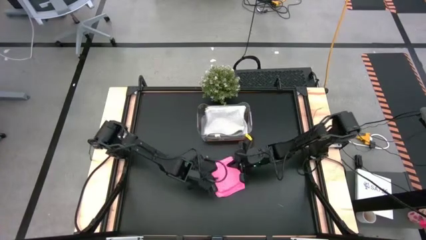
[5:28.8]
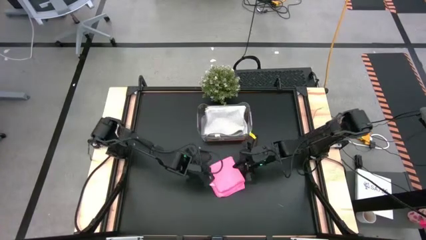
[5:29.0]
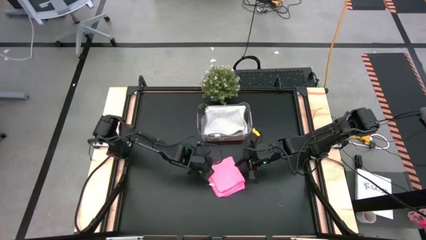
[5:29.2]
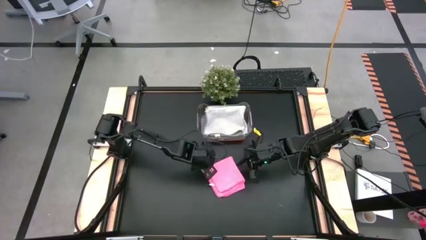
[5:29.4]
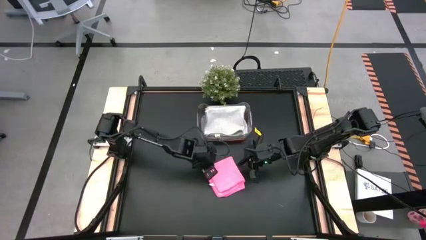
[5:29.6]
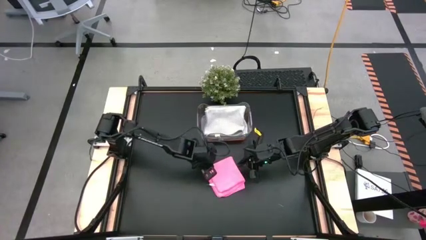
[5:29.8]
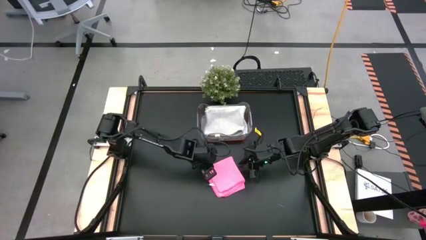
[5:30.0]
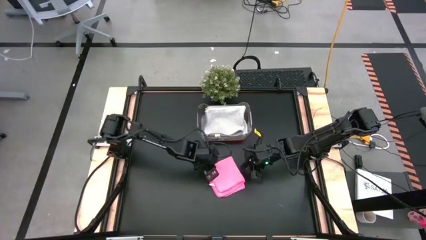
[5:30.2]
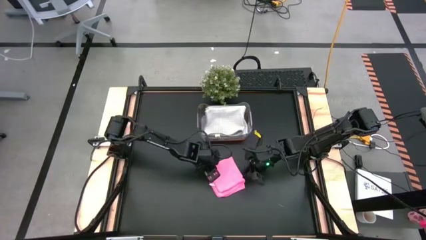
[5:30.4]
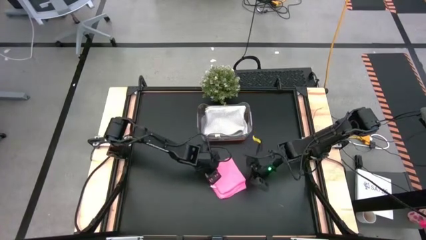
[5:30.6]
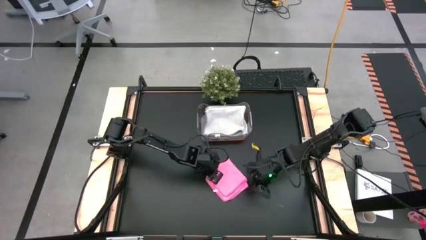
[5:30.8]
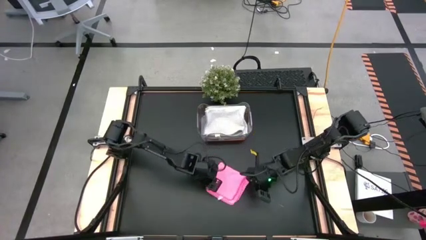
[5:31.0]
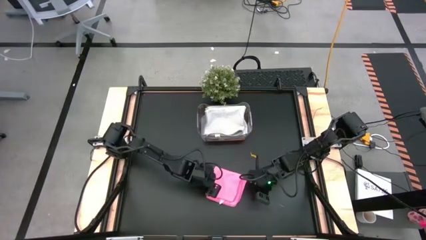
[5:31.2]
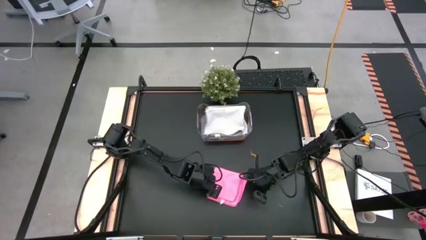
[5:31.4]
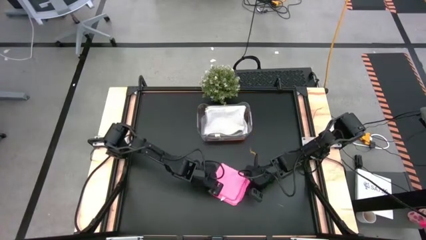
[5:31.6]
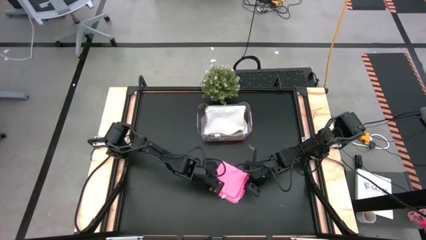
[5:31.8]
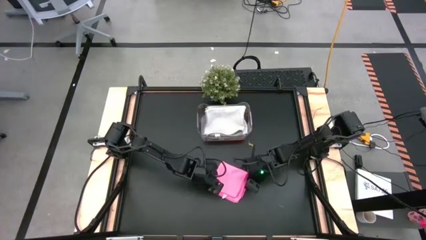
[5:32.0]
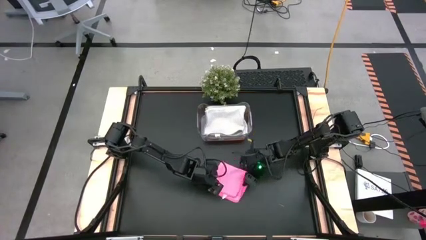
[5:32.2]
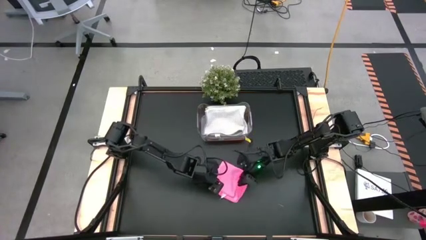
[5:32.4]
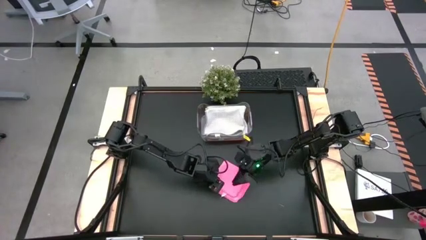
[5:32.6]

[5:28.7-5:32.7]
Task: Fold microfiber towels
Put the pink microfiber towel into the transparent bin

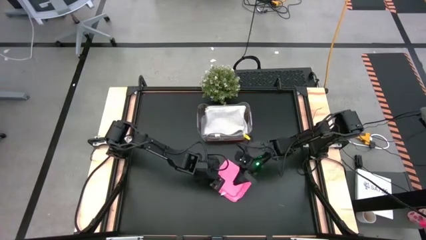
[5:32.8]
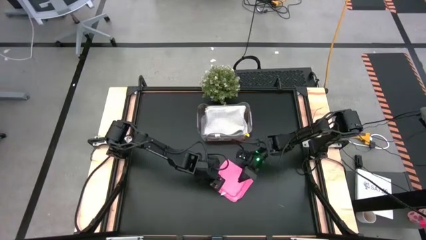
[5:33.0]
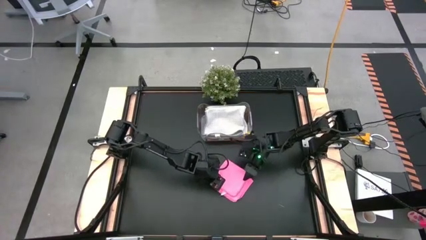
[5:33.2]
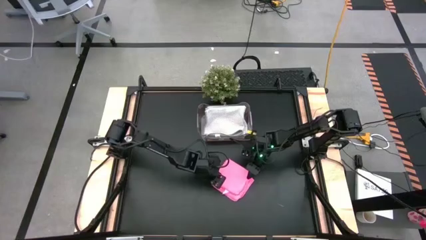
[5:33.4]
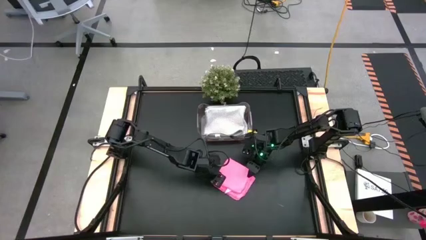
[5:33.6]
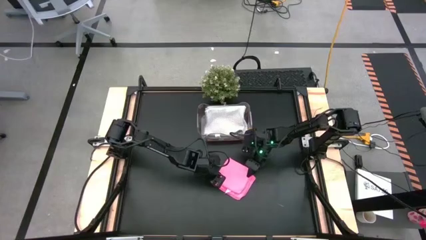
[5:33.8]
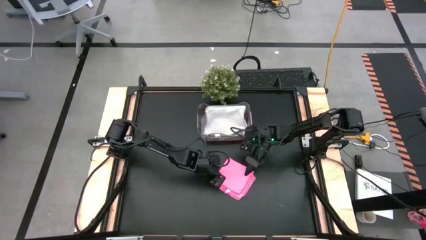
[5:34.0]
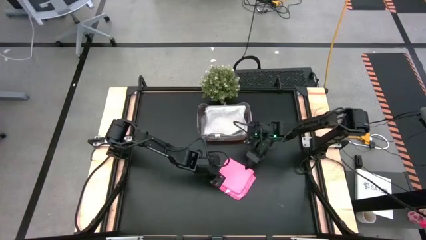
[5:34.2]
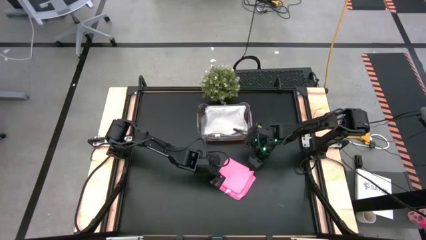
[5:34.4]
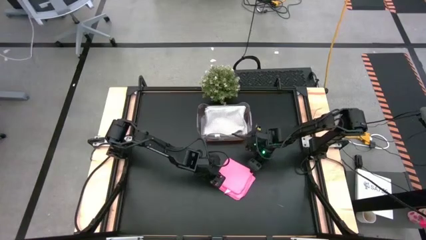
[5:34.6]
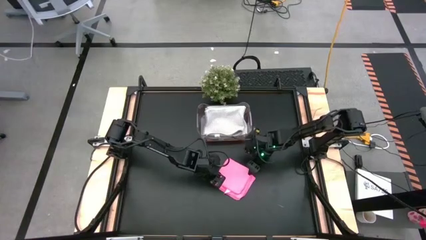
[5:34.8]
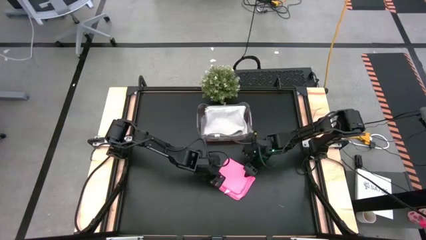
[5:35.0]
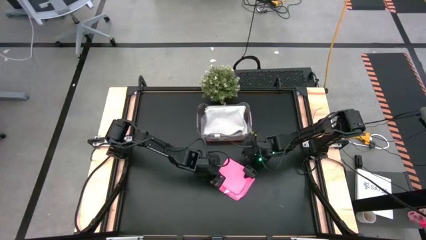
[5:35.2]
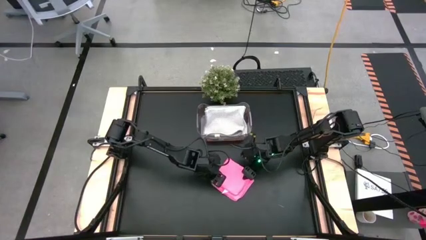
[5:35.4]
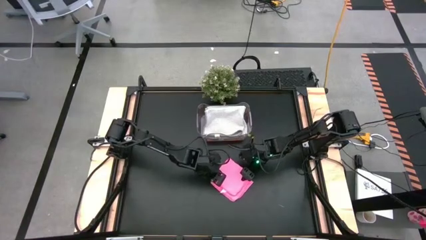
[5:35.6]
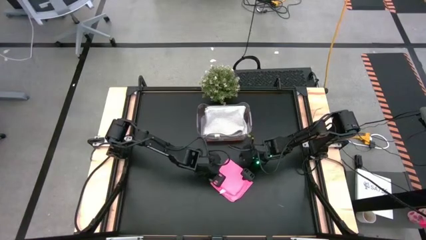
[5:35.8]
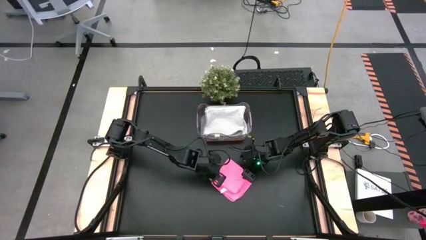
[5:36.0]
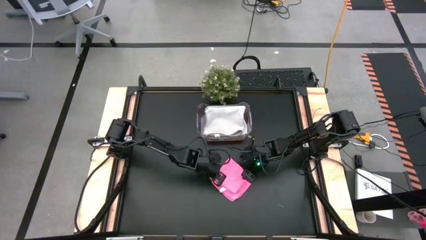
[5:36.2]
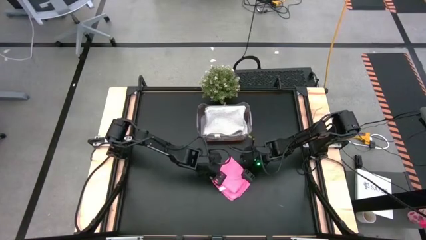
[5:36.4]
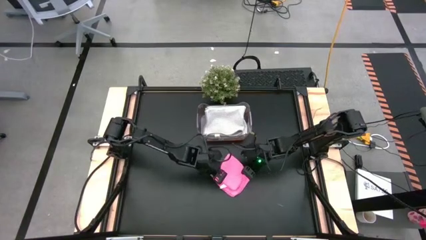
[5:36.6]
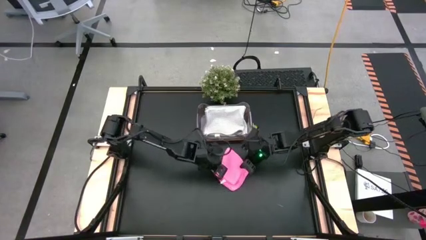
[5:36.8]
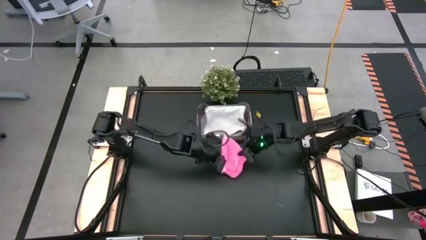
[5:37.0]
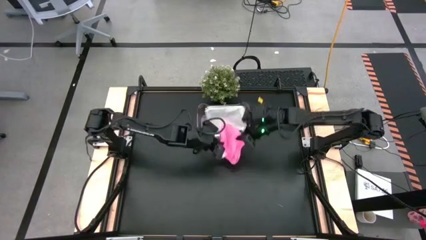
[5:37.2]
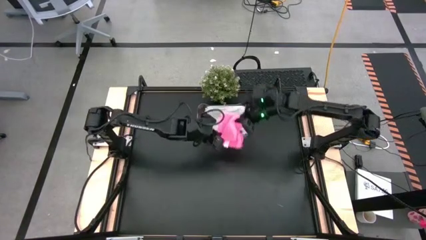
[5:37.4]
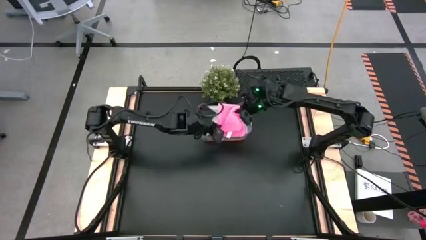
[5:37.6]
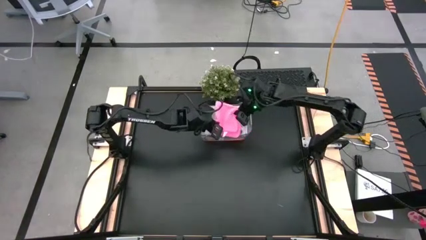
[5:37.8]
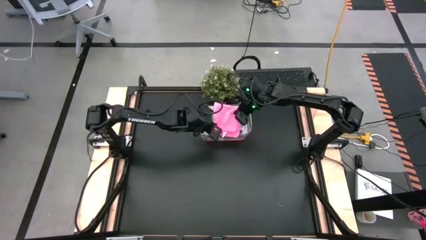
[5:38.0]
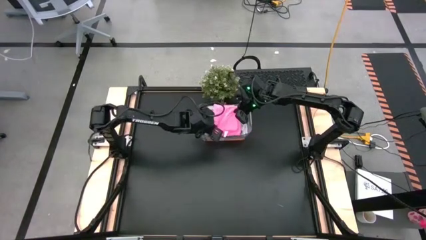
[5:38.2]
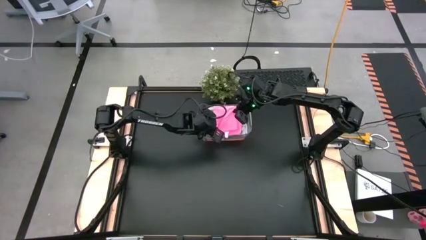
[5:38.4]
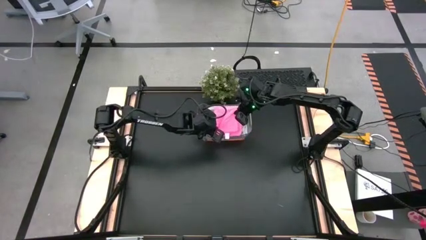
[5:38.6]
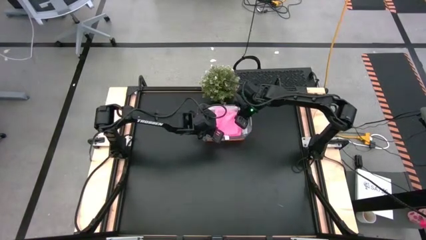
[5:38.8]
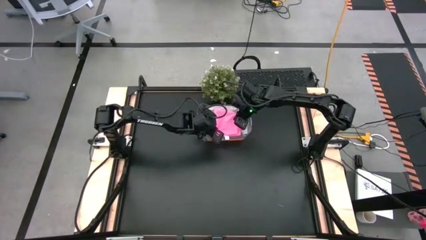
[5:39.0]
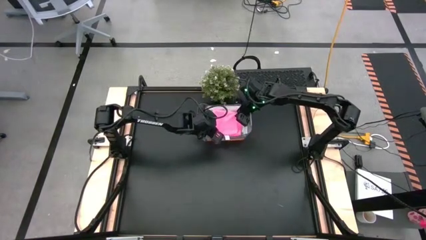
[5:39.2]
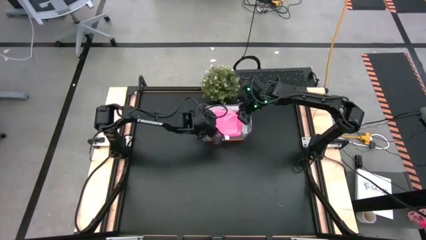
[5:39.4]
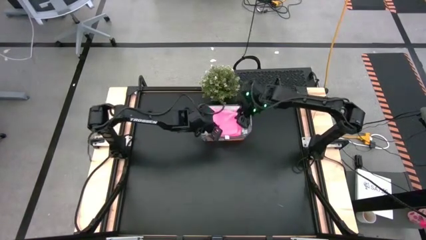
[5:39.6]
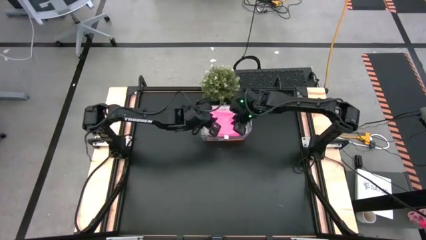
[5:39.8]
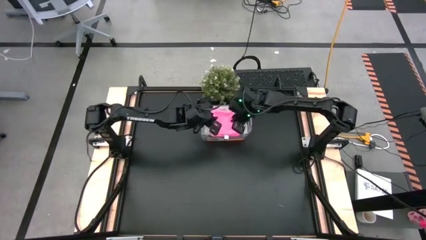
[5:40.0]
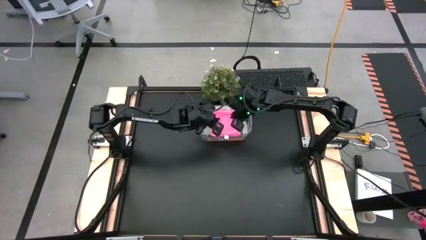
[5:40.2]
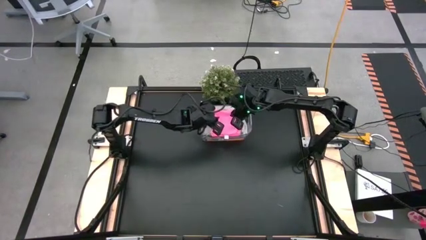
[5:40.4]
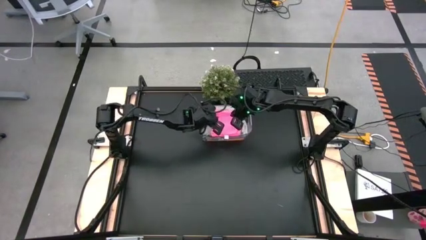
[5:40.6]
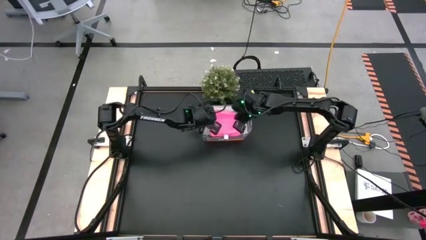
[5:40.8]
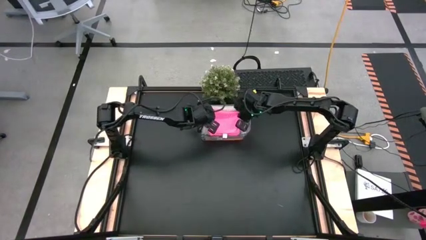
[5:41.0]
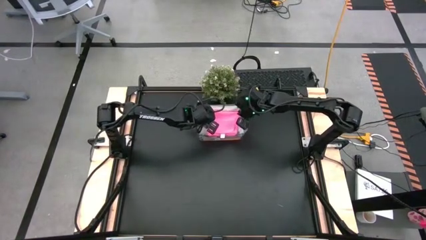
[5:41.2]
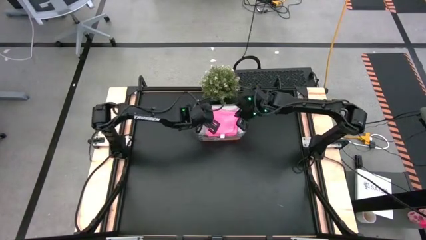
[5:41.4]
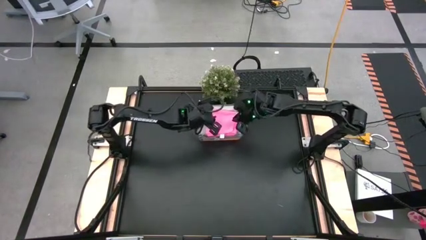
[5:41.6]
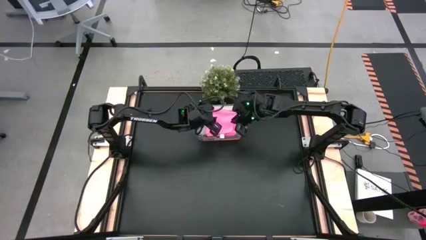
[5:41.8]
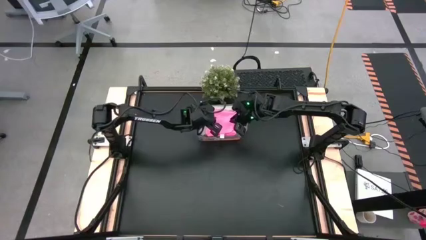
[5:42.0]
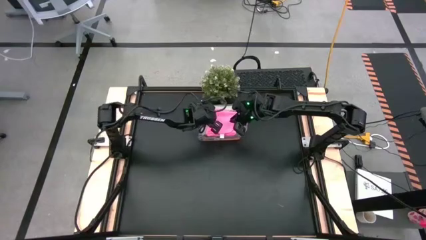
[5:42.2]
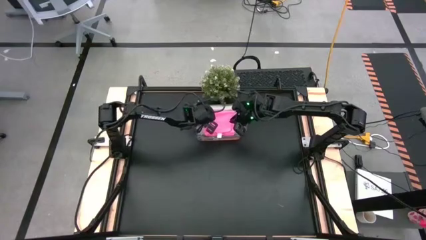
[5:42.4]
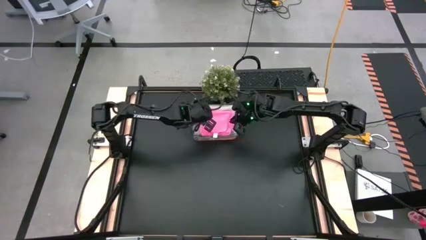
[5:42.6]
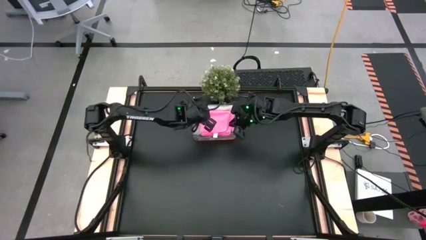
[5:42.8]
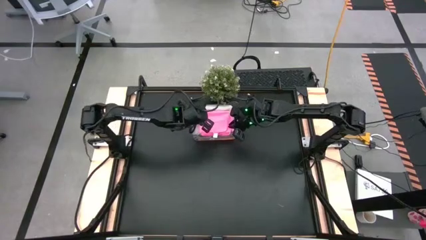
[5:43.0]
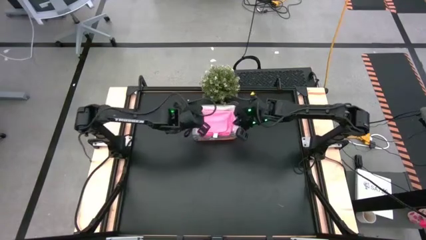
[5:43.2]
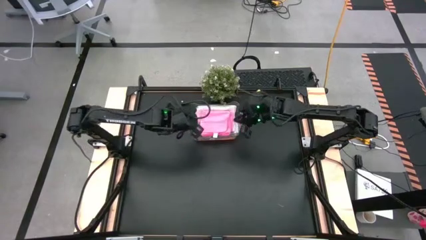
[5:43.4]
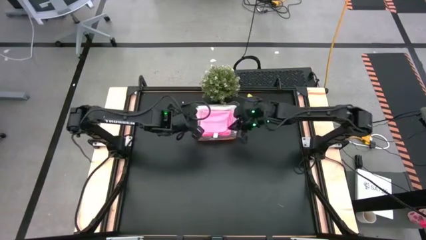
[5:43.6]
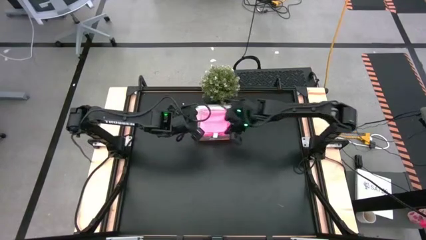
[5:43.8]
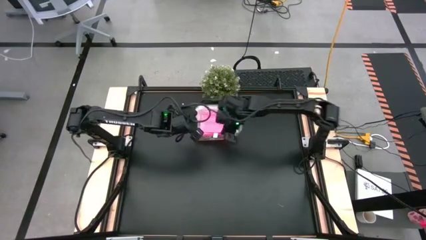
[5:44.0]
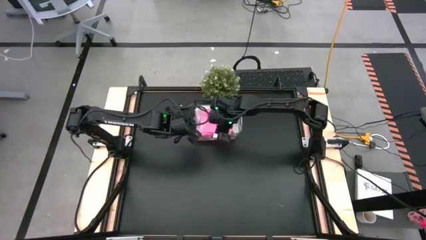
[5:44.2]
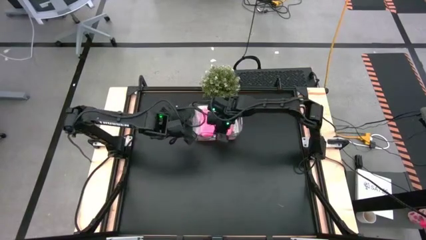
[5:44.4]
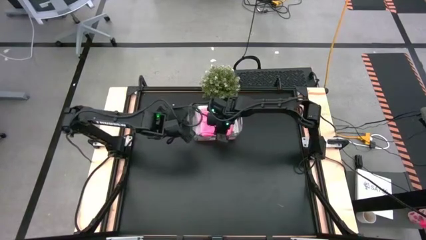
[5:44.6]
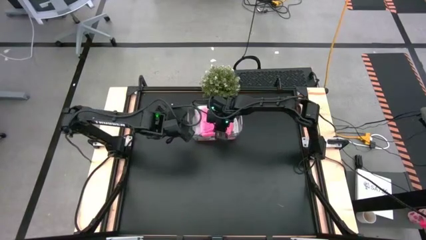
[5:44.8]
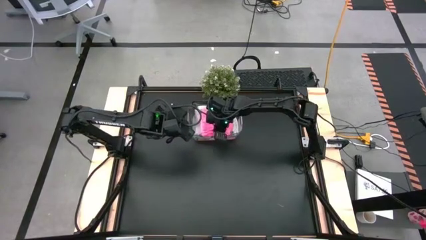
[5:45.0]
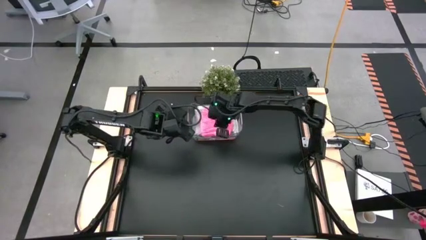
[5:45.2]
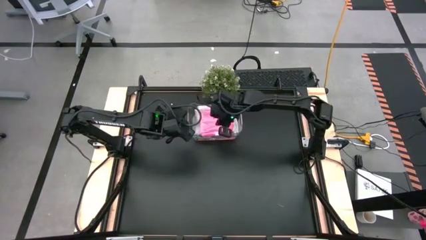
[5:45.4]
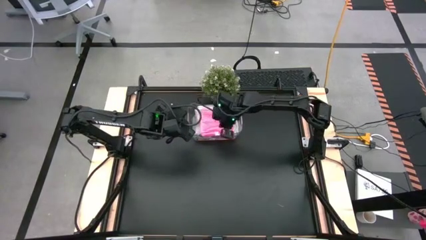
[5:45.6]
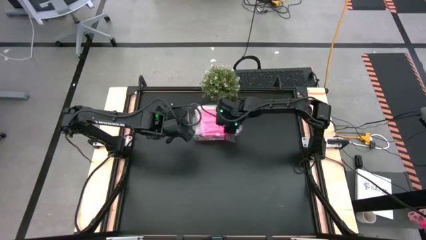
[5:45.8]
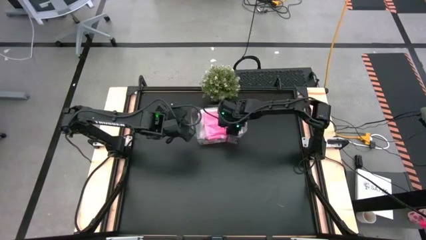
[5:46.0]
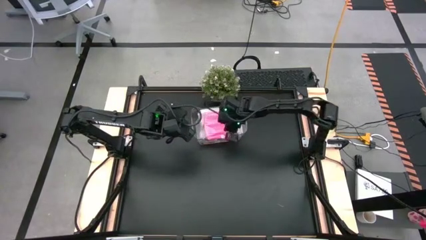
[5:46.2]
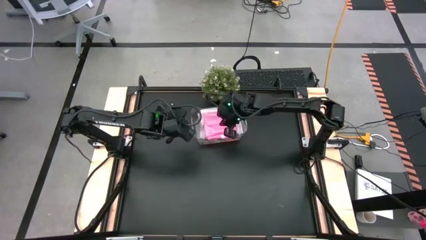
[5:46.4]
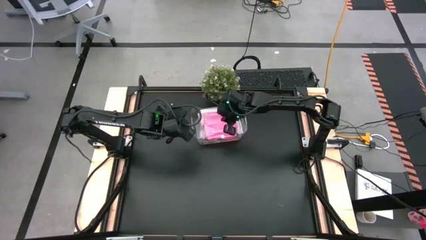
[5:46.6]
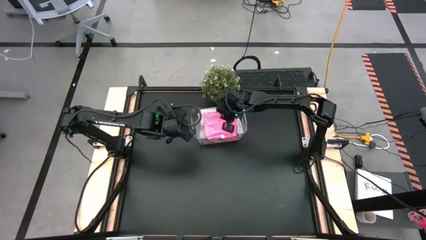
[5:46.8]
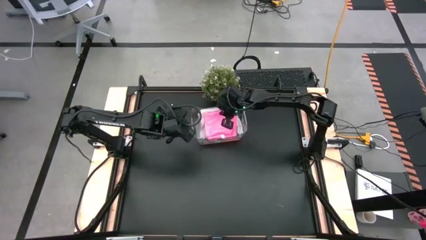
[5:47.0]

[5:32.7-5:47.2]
Put the pink microfiber towel into the transparent bin
